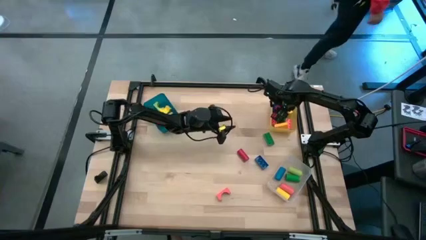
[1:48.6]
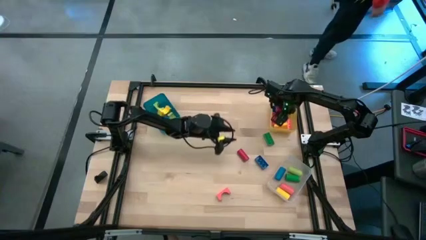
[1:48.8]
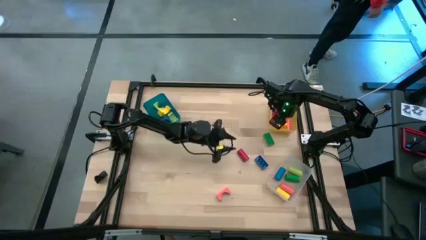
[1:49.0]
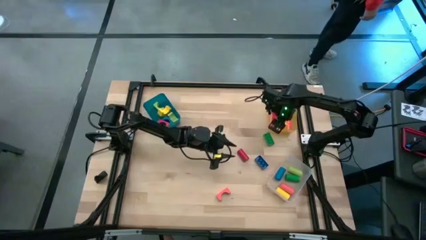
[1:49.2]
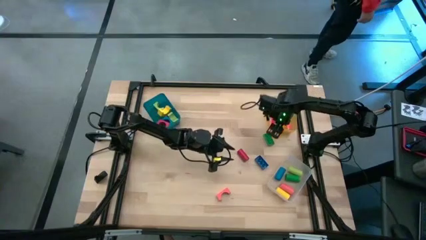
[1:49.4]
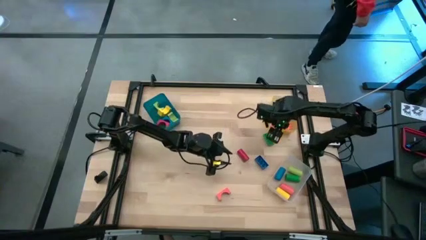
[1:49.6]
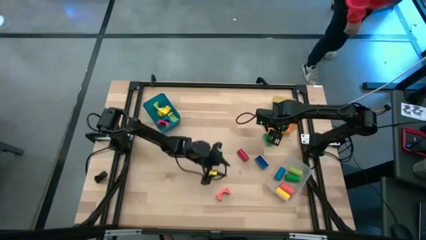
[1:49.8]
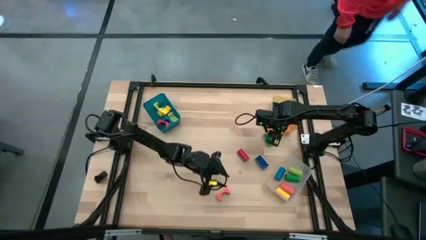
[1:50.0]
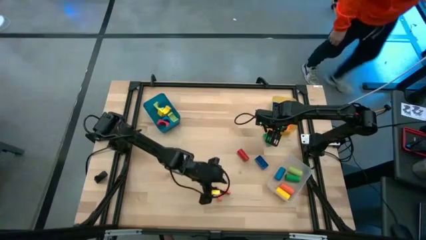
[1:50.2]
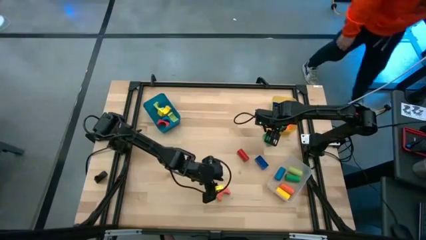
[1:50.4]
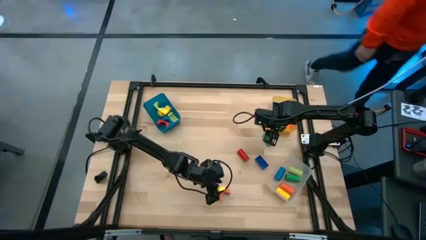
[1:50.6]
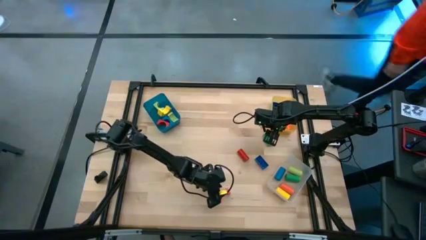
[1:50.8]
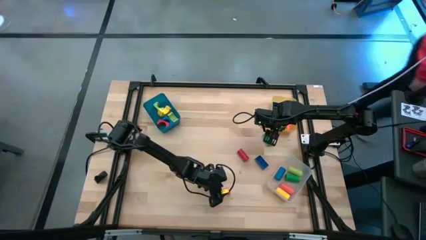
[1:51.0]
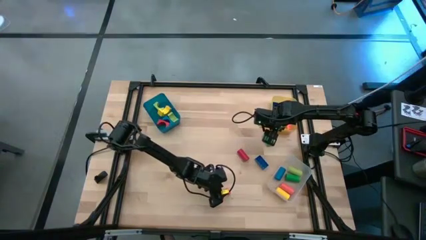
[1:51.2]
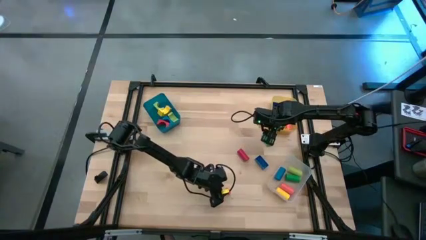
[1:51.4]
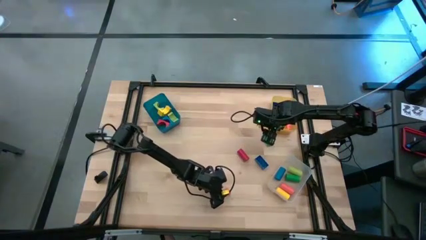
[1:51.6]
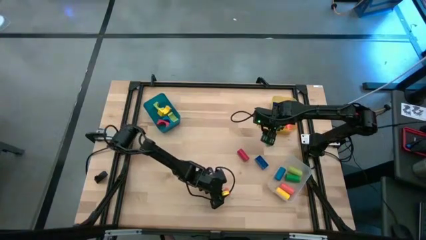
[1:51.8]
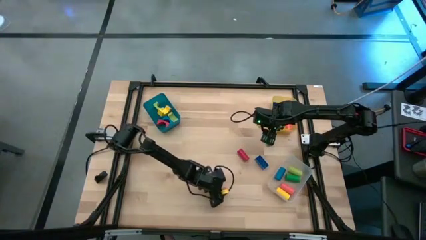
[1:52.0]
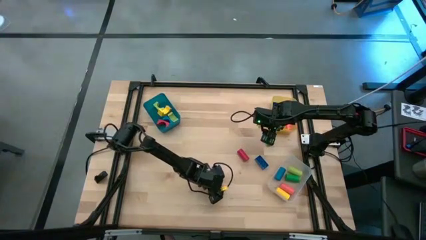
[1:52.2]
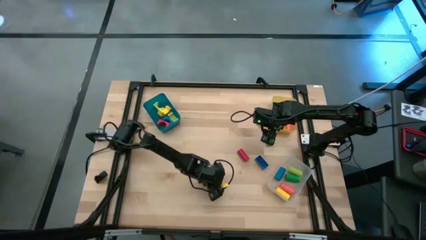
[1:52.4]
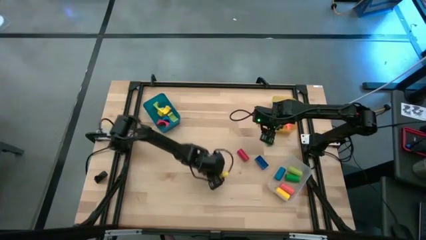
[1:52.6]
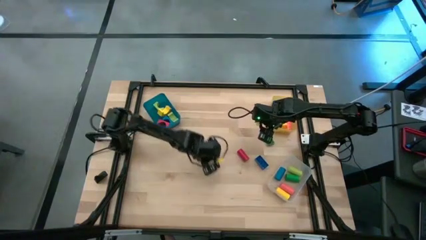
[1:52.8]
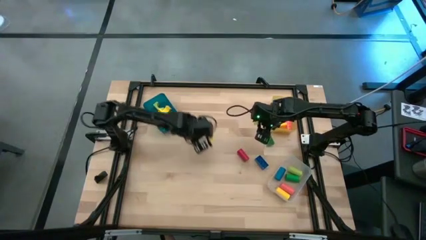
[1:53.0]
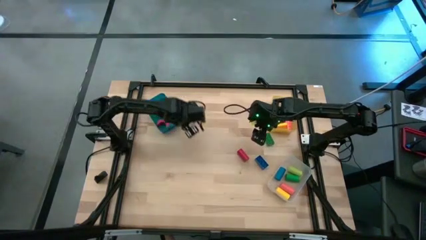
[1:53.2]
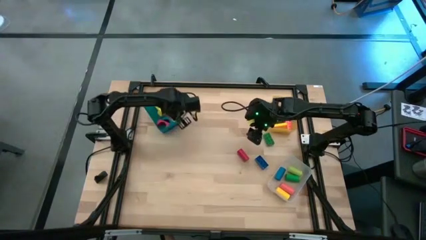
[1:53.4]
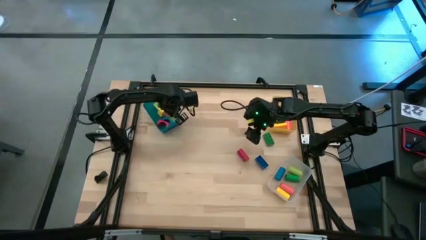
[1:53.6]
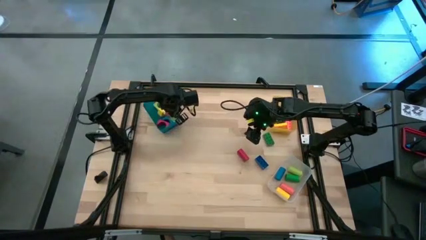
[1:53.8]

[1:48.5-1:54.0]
Task: Sort blocks by size
Put the orange arch block into the blue bin

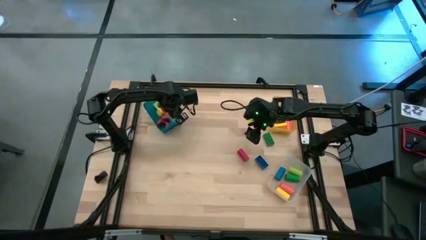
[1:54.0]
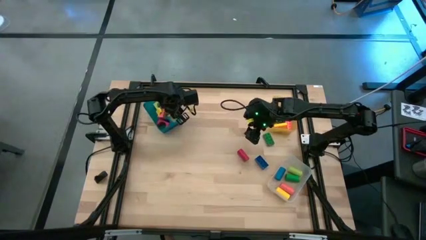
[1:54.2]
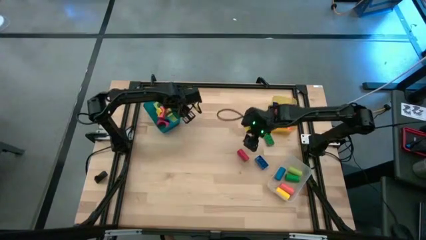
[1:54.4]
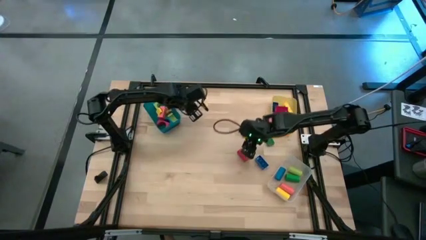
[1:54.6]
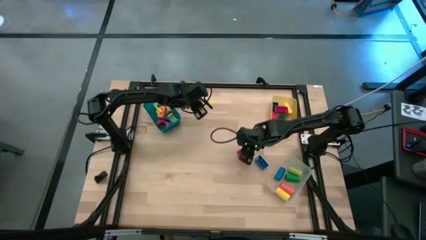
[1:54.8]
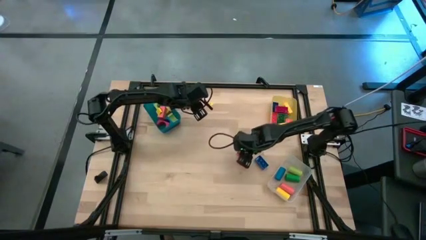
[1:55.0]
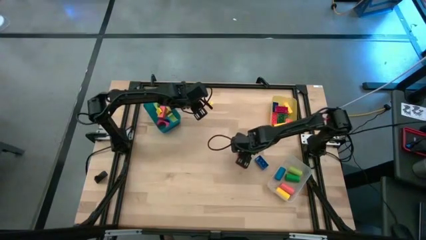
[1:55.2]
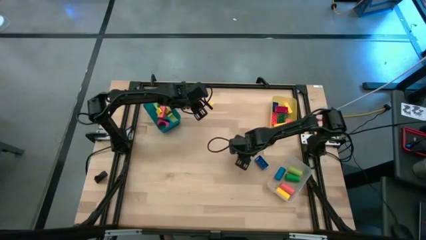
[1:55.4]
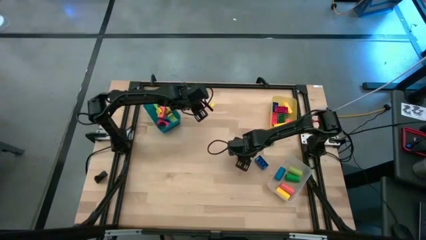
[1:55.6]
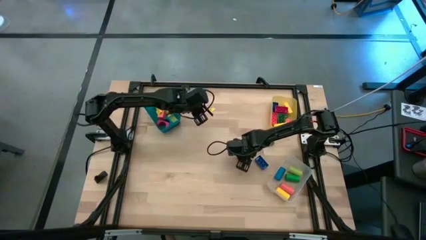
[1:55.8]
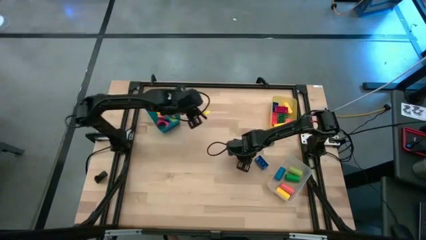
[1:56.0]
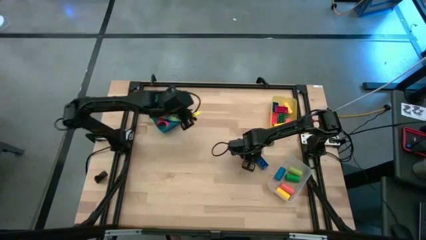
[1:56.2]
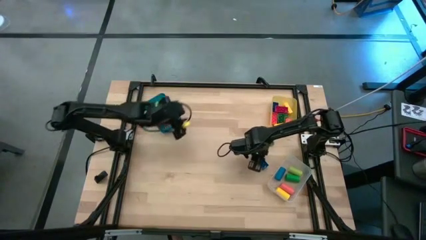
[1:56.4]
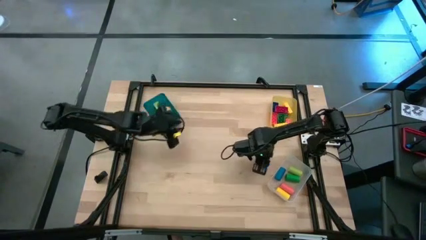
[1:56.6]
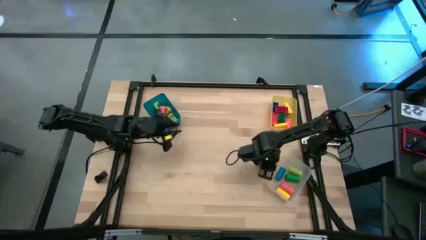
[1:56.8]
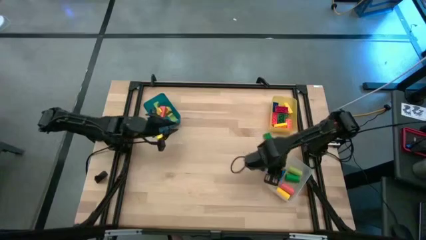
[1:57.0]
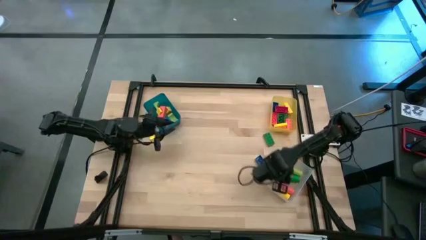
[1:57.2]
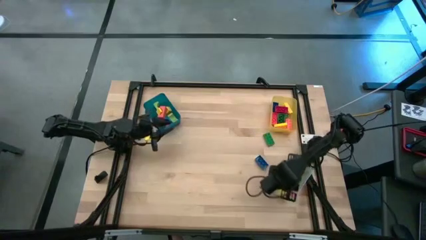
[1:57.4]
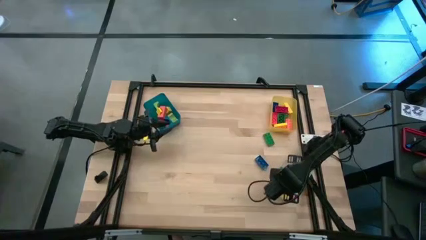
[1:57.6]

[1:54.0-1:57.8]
Put the red cylindrical block into the transparent bin

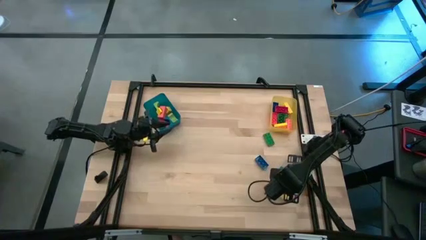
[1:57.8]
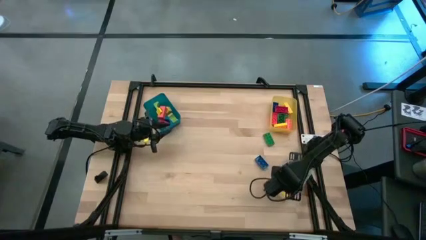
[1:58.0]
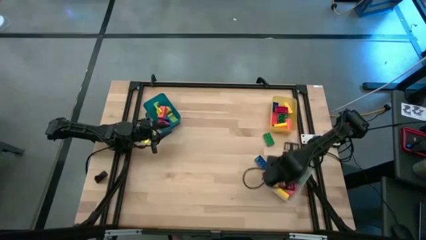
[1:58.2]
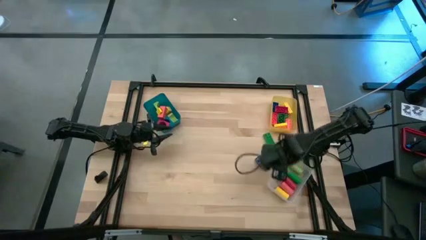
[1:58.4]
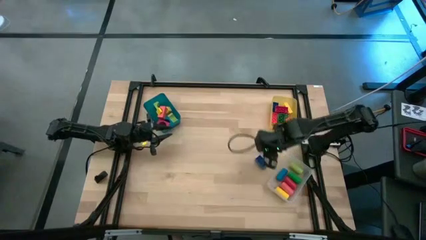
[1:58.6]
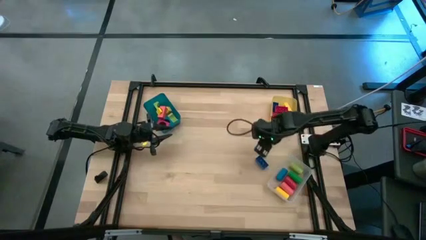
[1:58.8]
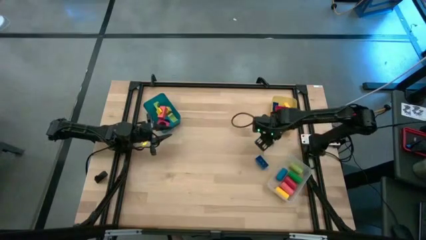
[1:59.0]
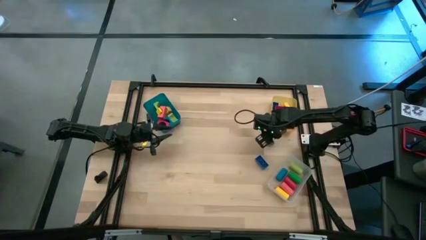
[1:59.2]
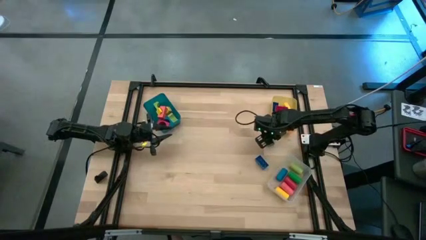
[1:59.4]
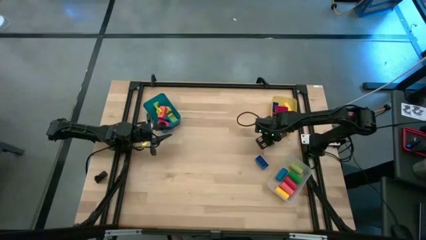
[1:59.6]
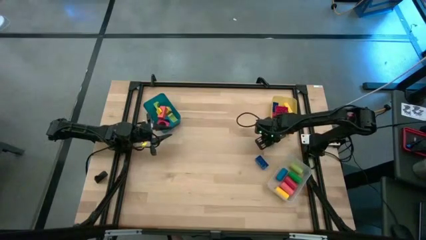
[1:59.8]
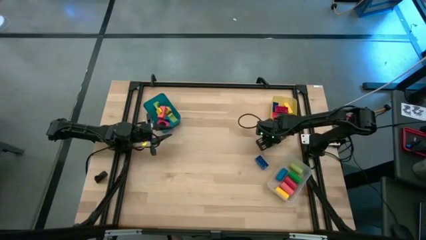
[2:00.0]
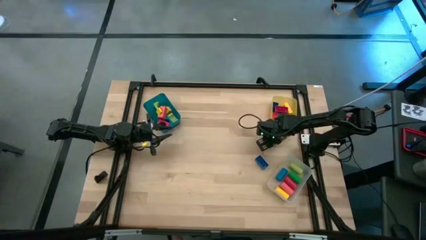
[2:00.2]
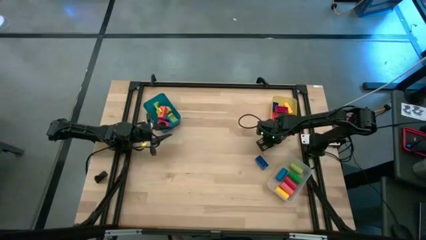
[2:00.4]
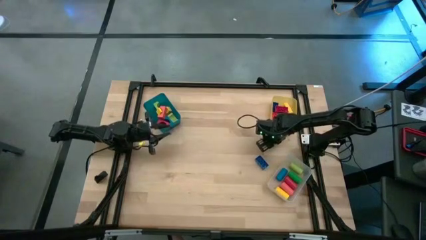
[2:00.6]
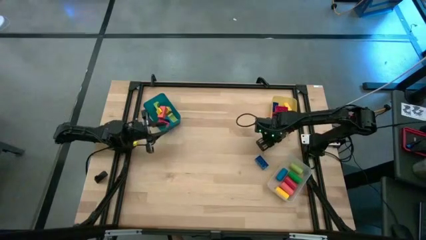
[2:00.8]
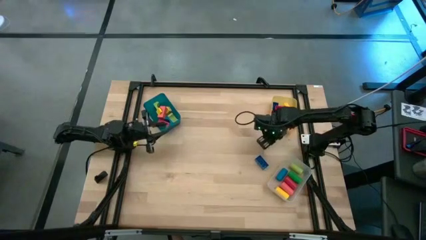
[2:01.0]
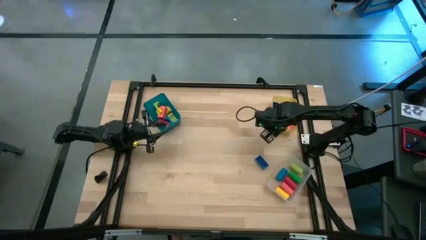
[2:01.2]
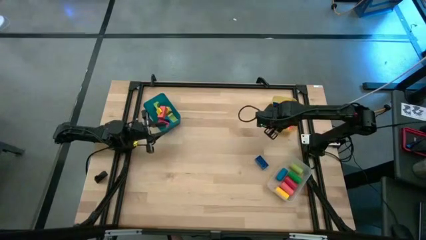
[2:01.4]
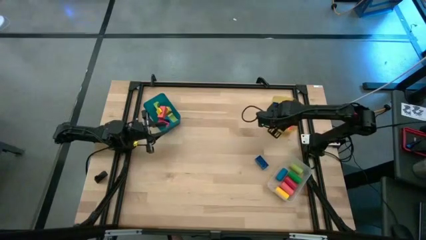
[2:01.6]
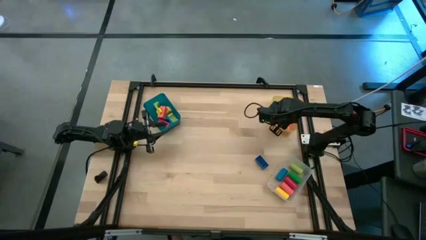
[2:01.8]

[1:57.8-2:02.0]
Put the green game piece into the yellow bin

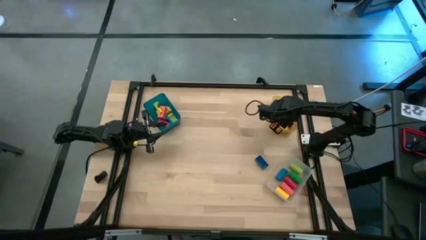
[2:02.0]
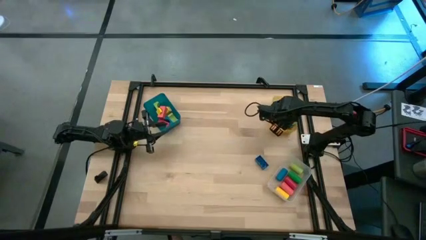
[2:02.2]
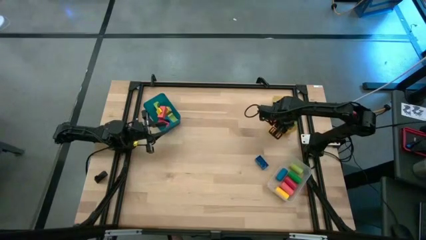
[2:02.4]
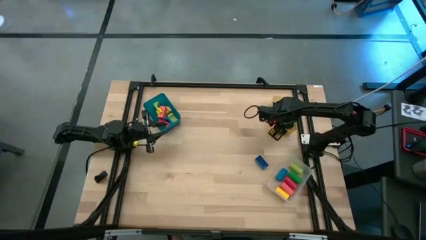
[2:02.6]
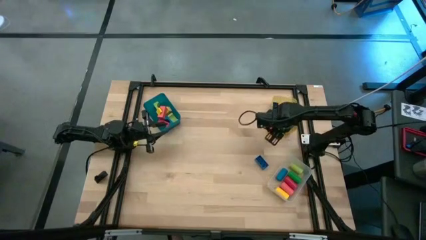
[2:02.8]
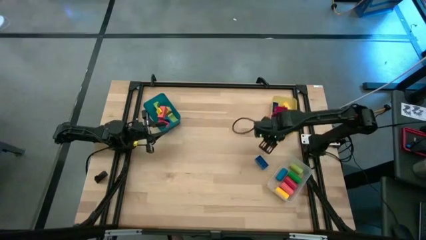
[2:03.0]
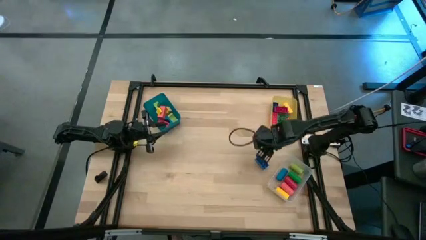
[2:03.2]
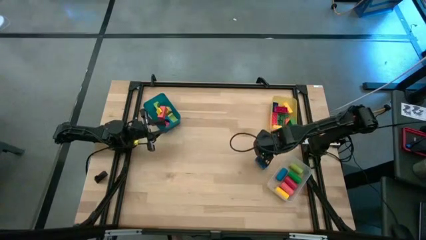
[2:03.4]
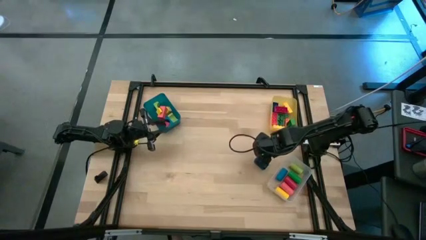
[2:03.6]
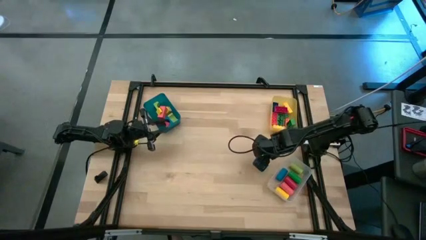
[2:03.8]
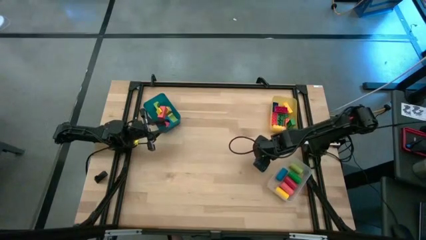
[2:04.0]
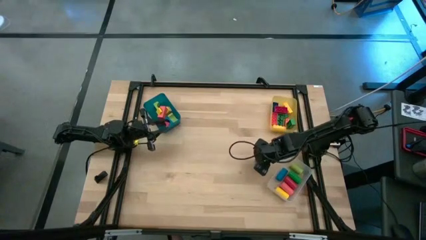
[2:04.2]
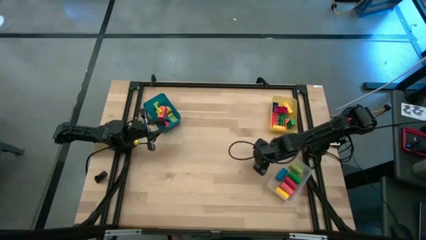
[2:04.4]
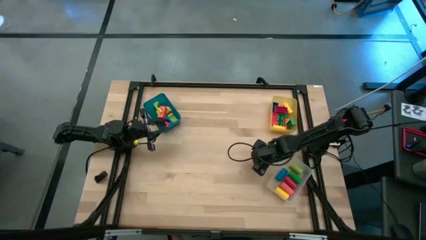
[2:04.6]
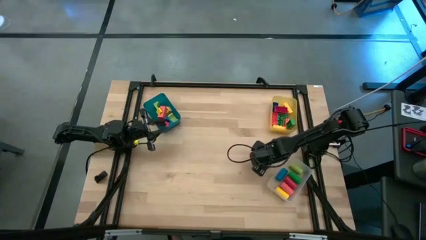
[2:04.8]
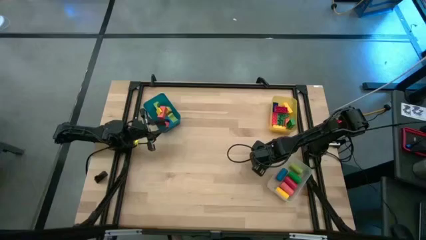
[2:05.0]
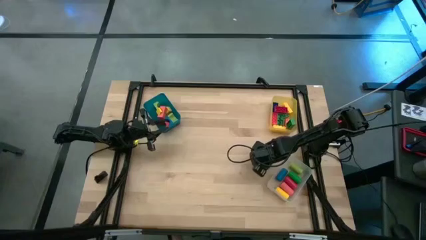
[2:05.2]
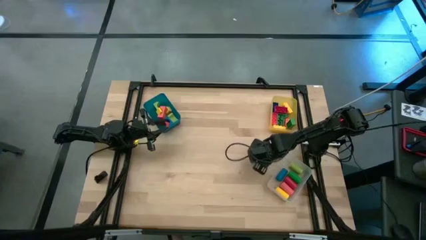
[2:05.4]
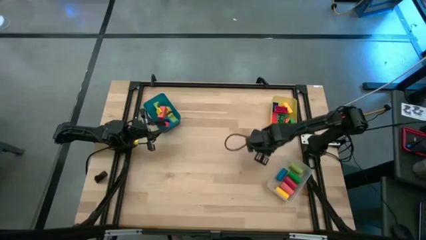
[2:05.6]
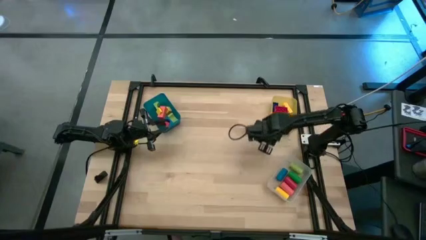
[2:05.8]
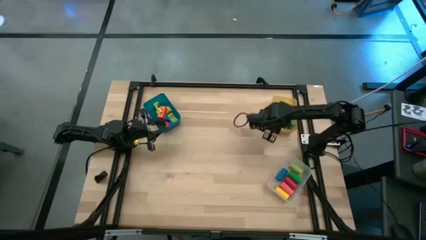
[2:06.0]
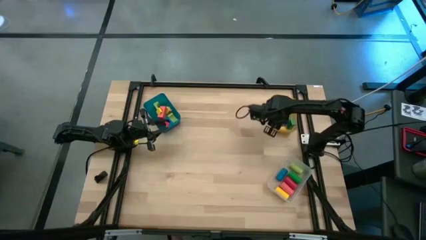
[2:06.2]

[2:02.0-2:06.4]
Put the blue game piece into the yellow bin
